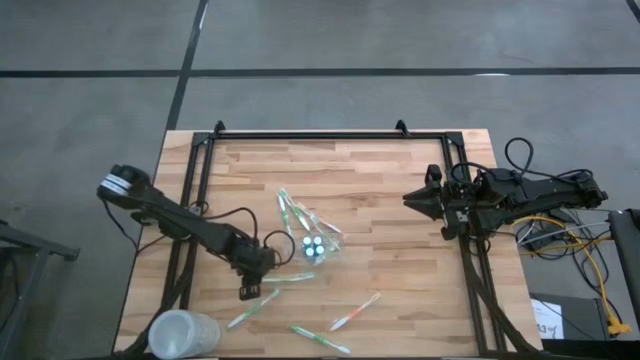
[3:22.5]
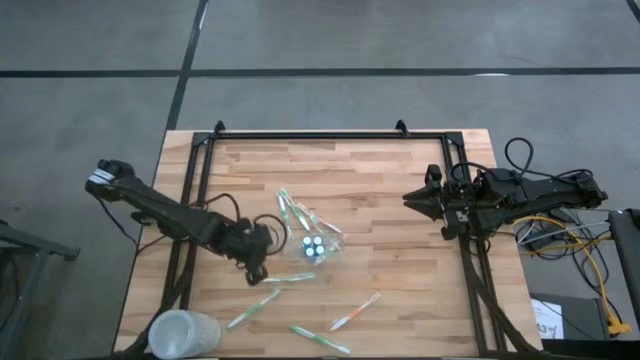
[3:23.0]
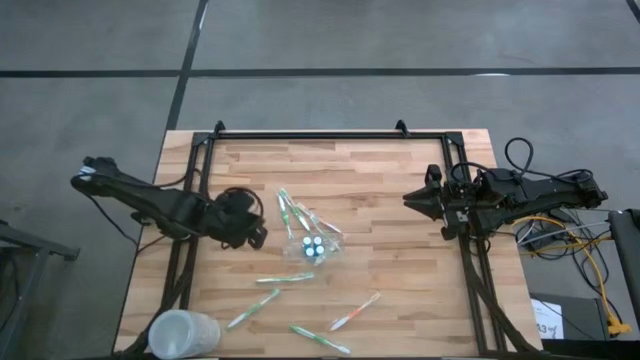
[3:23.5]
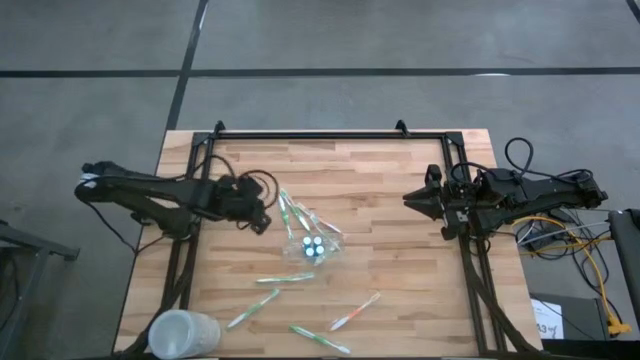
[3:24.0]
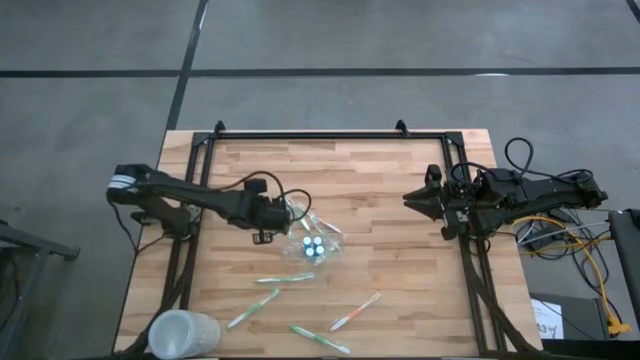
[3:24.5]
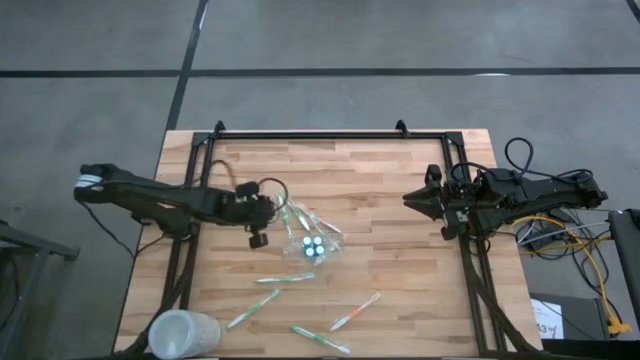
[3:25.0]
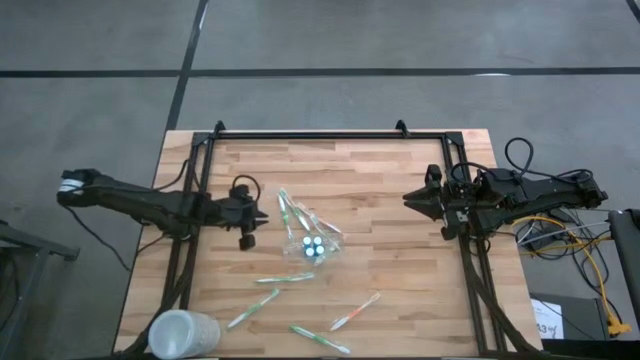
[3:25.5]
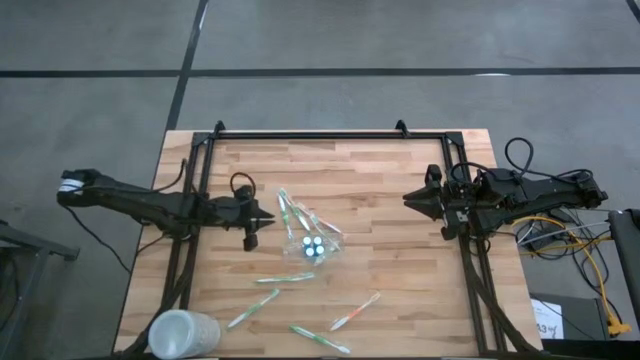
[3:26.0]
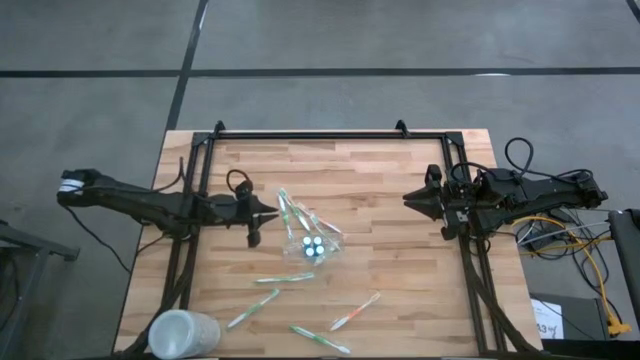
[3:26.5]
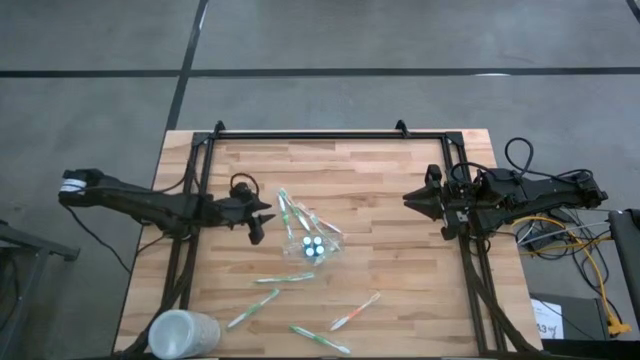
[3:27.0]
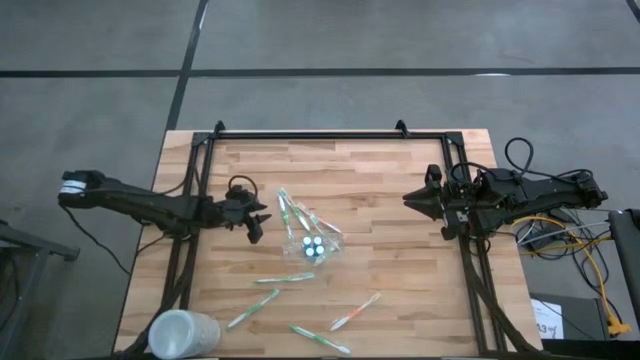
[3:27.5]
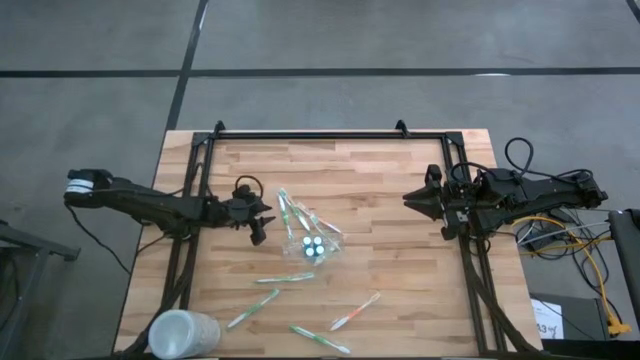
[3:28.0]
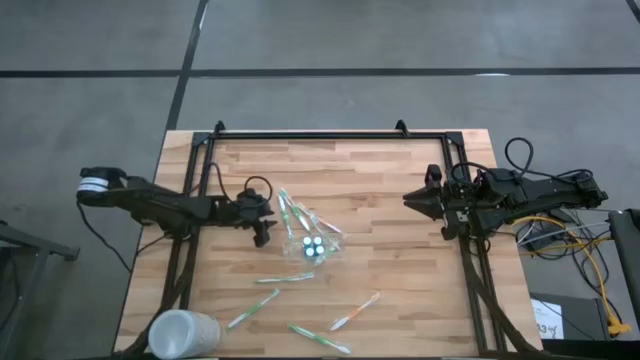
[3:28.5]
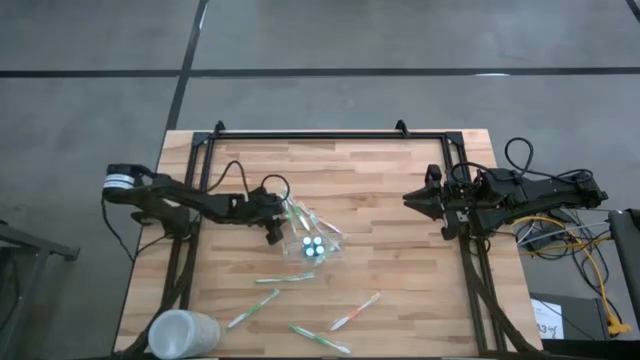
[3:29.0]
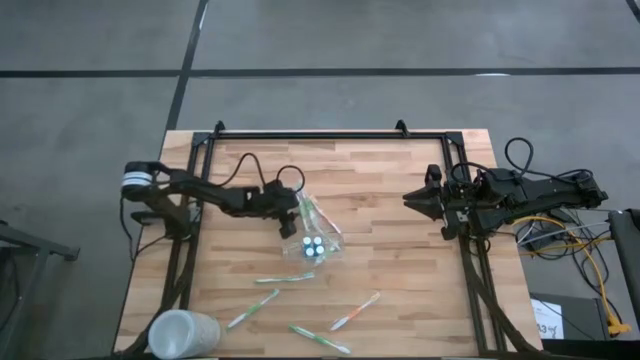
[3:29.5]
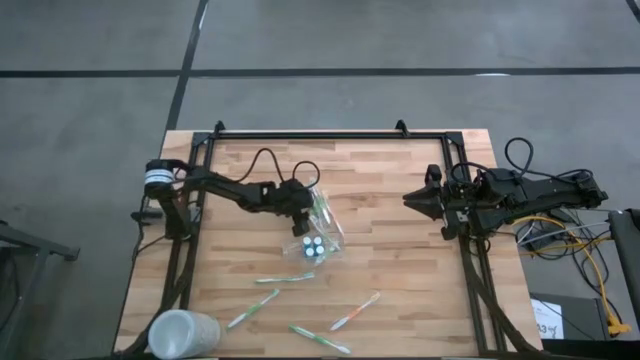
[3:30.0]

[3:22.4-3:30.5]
Task: Pick & Place toothbrushing station
Adjust the green toothbrush on the table

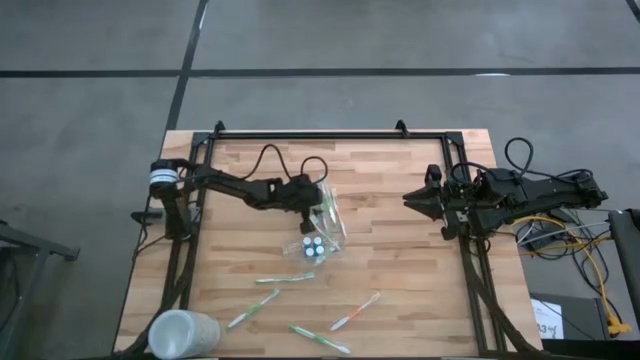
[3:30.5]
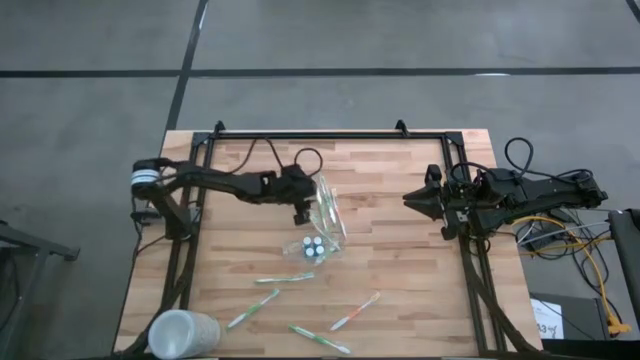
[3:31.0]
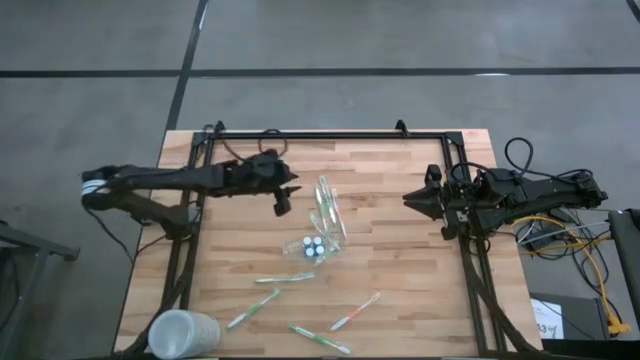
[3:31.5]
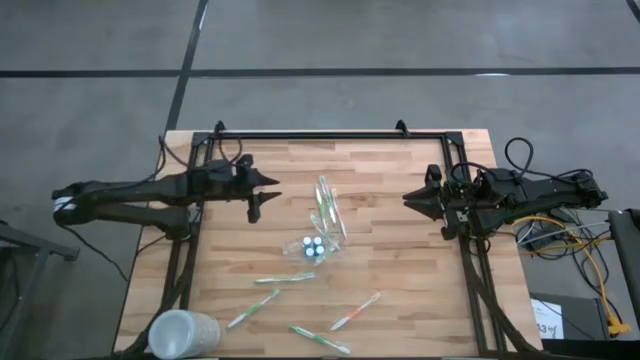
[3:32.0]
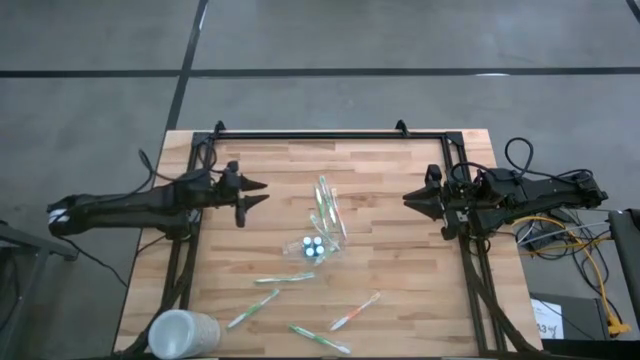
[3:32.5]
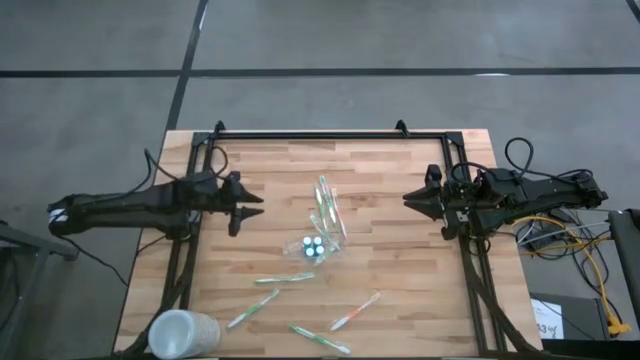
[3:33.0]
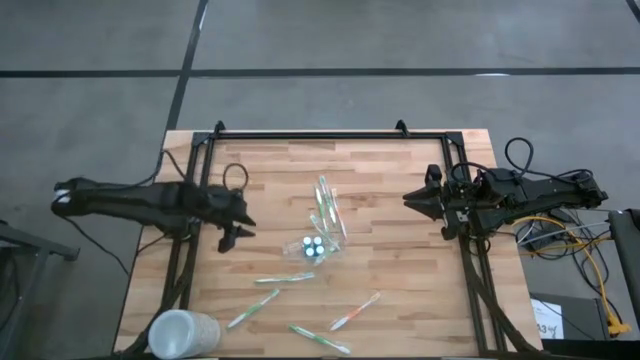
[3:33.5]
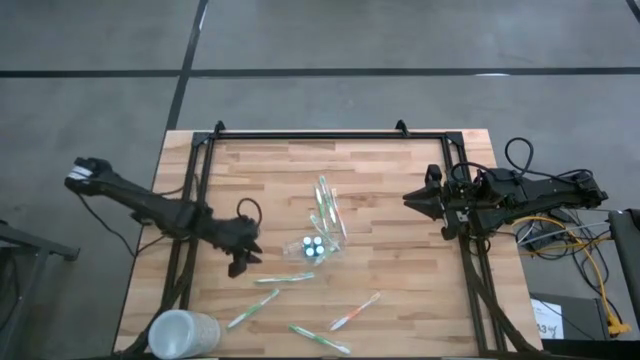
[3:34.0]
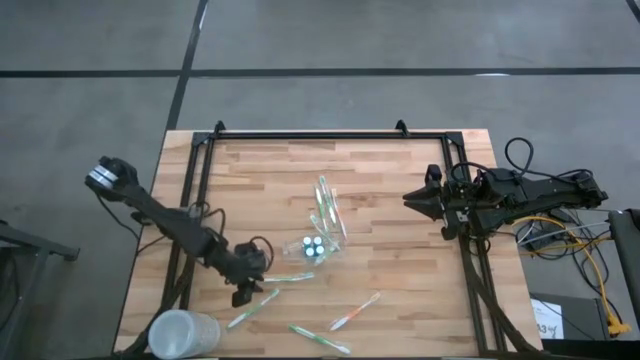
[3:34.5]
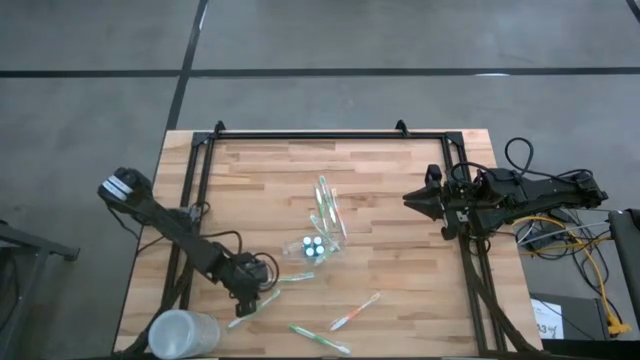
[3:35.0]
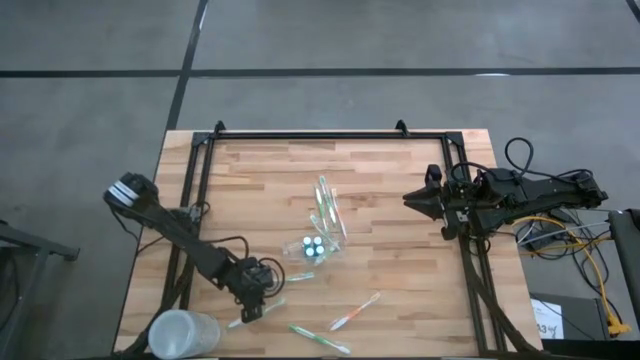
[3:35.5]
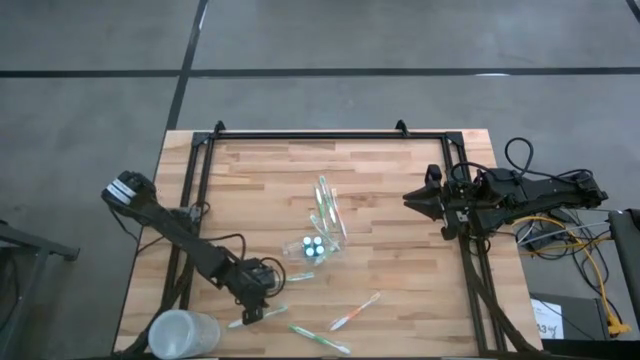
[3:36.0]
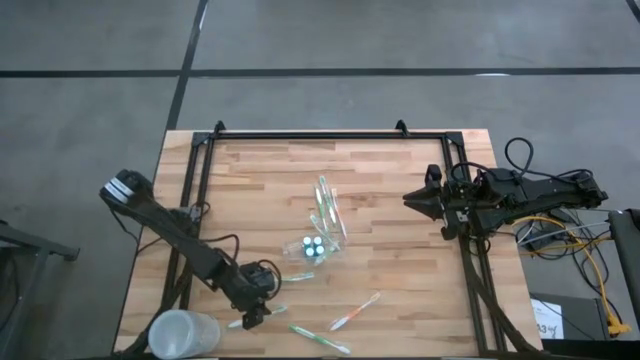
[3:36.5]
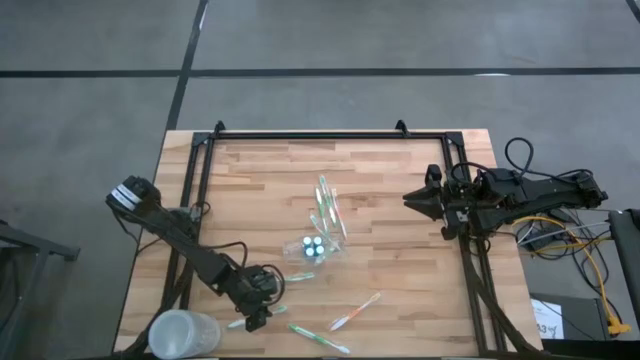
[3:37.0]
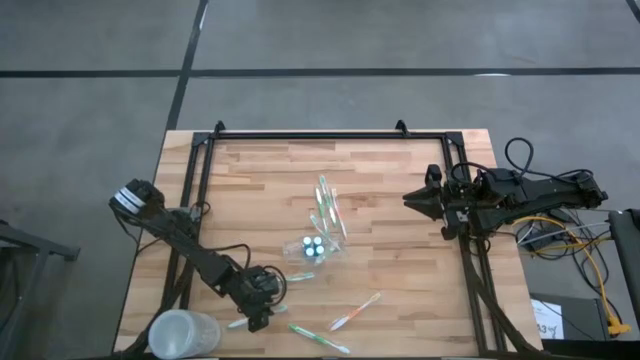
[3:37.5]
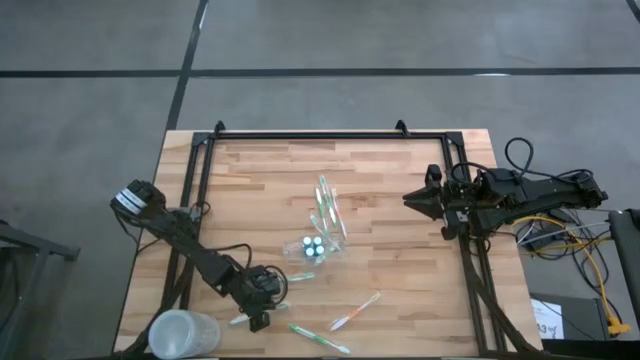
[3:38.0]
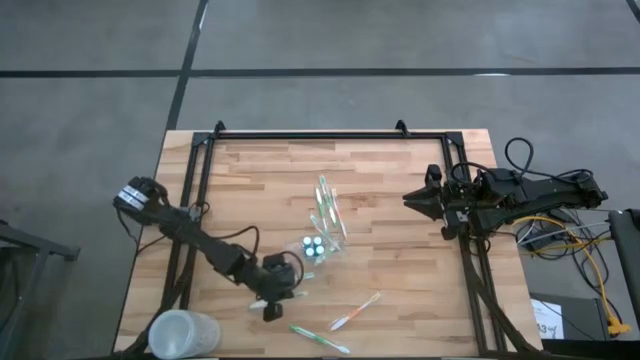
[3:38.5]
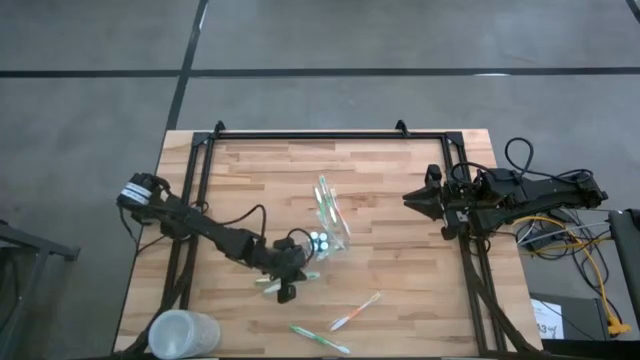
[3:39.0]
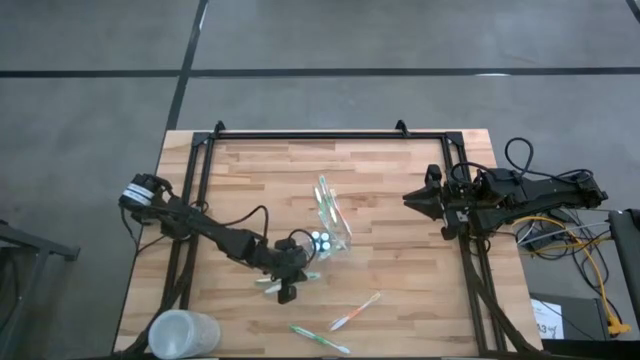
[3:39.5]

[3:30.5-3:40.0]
Put the green toothbrush into the transparent organizer

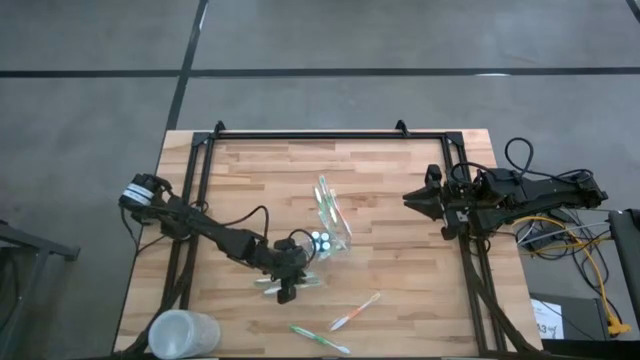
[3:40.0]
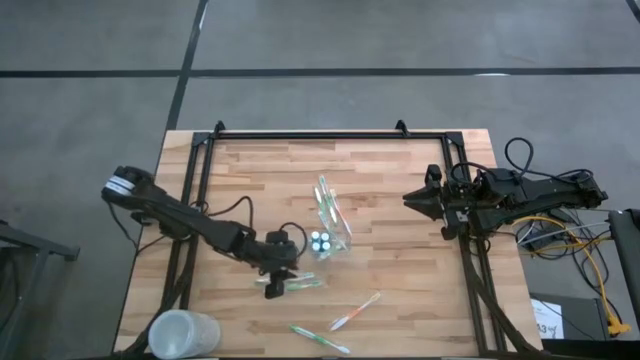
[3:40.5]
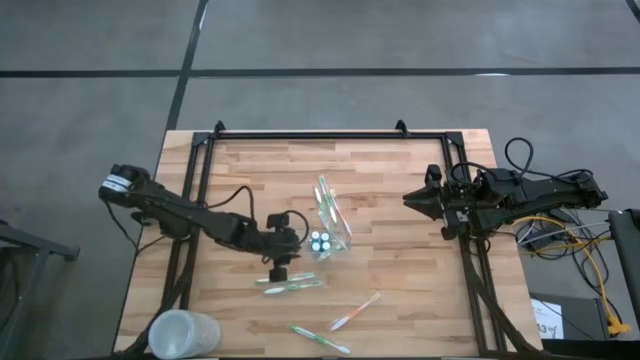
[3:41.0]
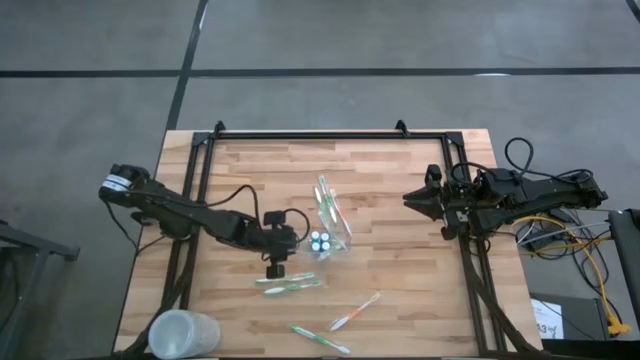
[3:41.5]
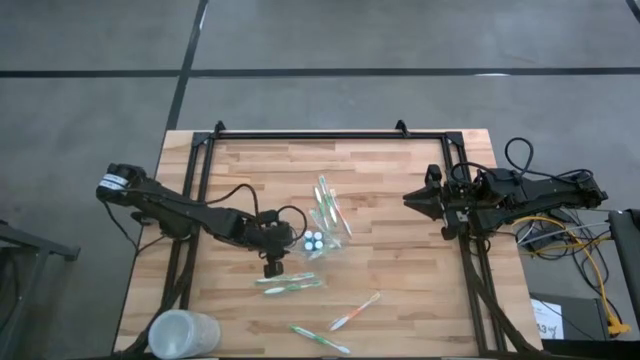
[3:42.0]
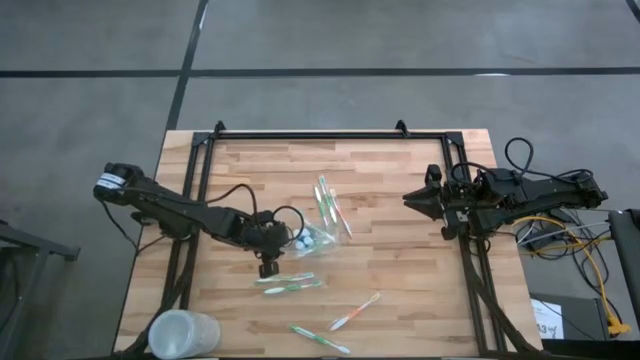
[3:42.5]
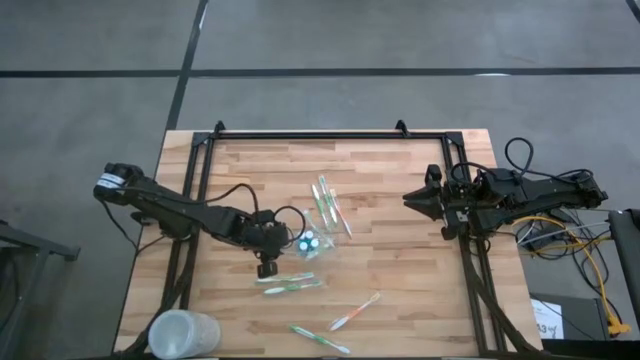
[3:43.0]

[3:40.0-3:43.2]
Adjust the transparent organizer on the table
